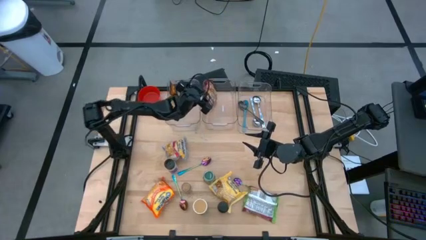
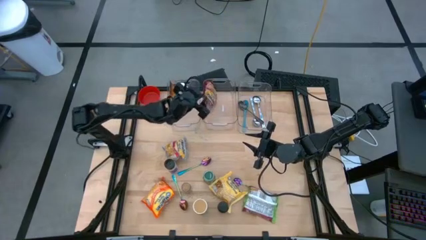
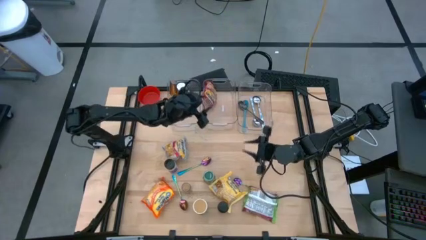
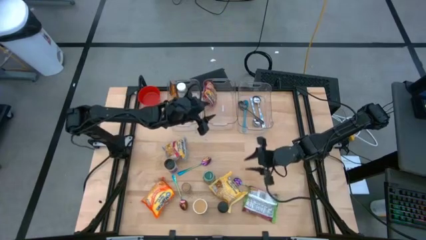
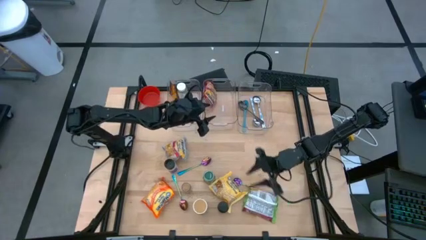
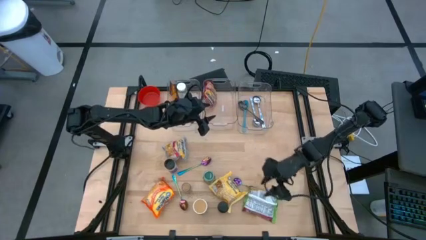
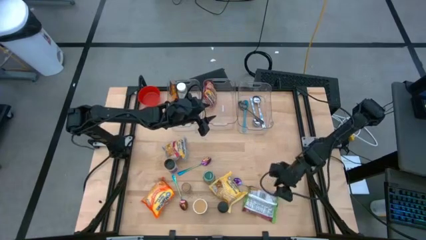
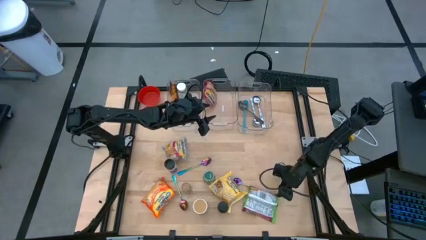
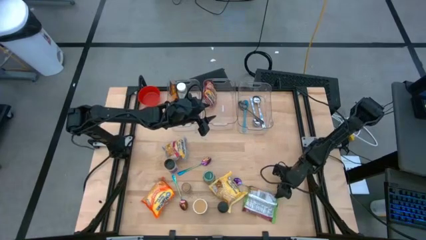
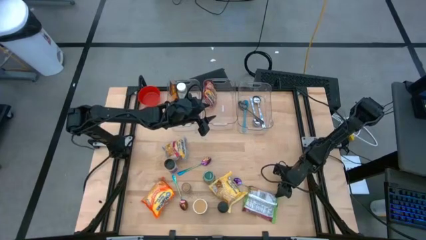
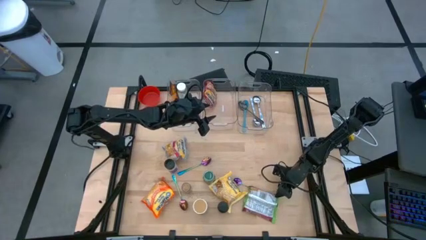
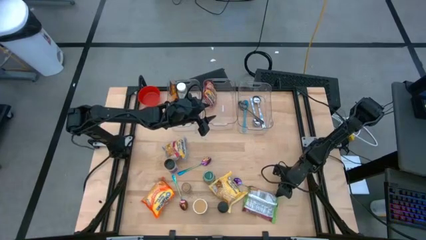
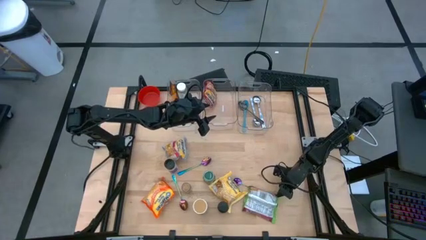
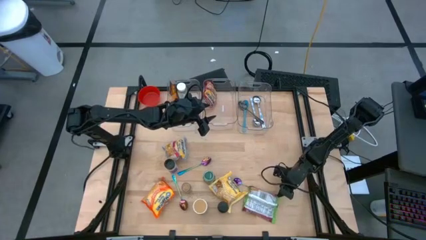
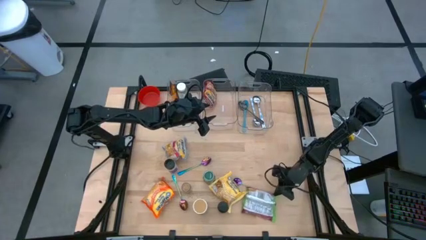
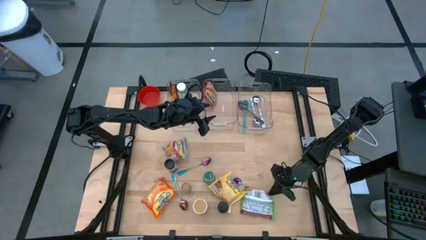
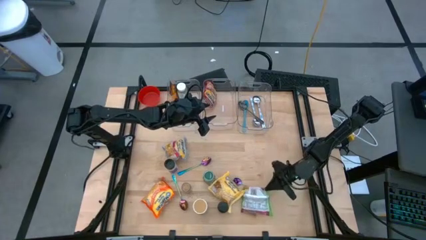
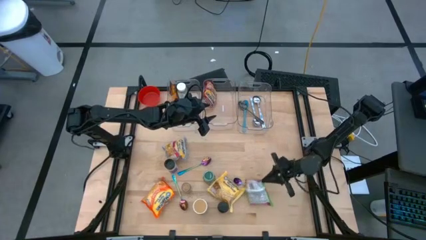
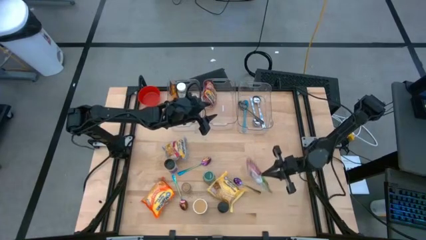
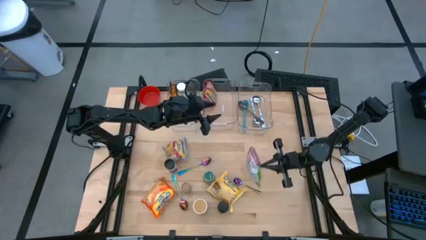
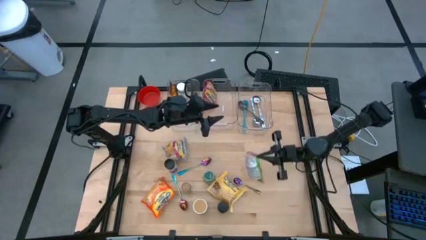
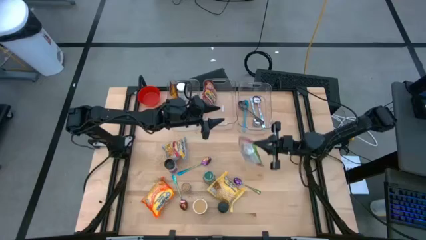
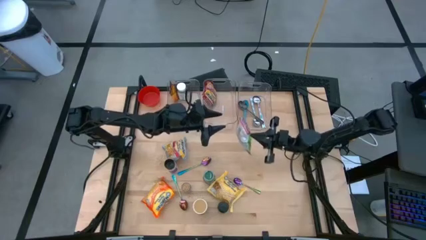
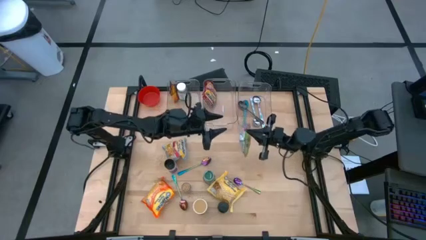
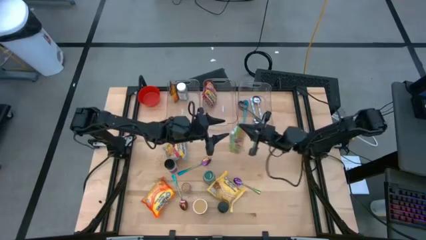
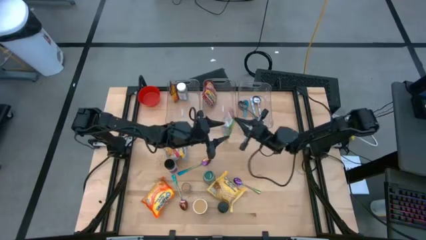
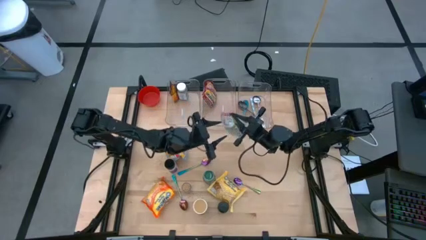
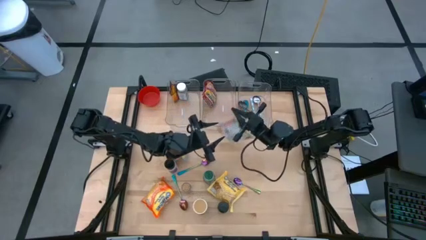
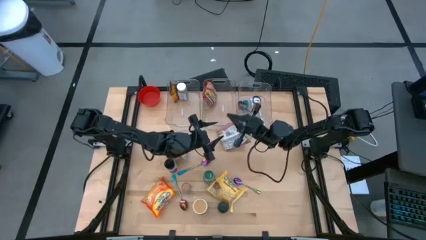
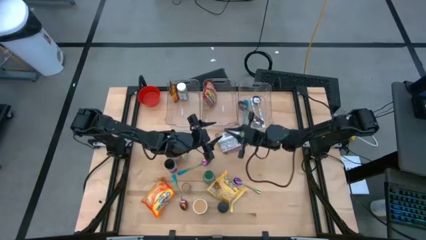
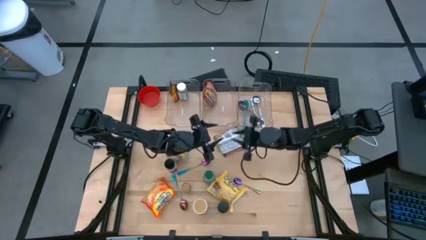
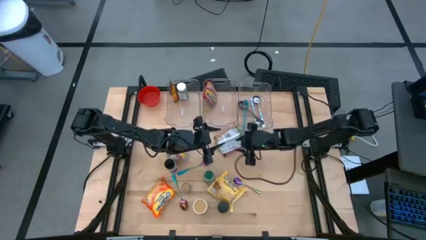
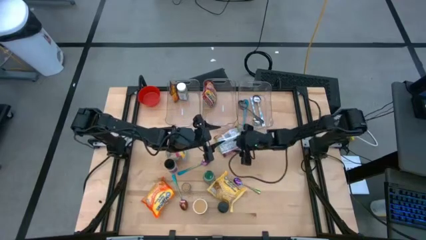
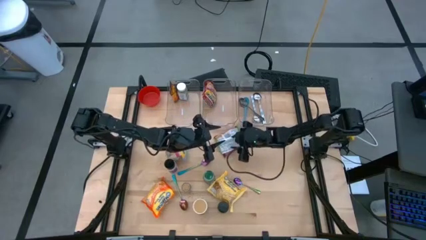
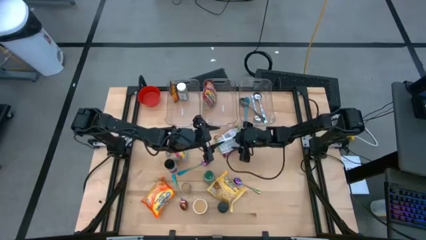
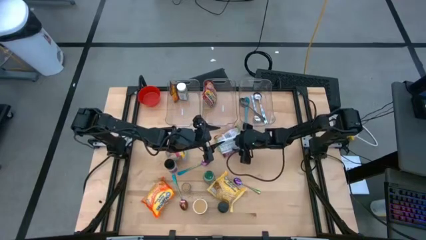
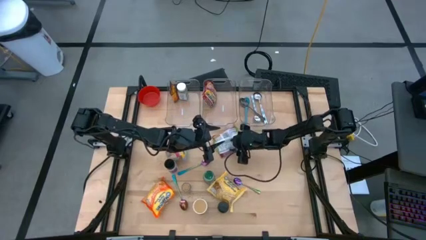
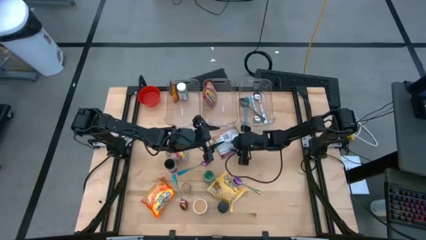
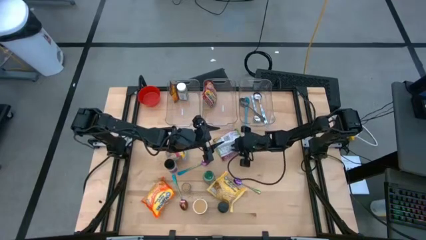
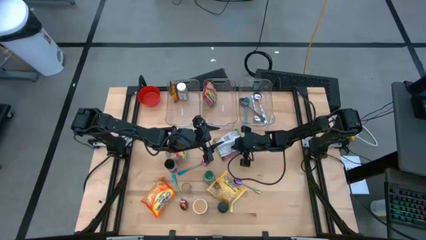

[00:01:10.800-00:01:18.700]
Task: Pick & Place Food Item
Put the green noodle pack into the middle transparent bin

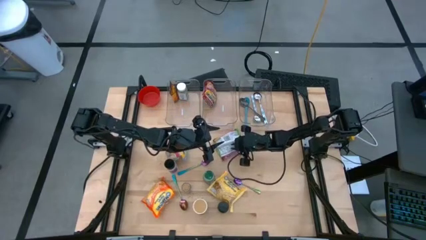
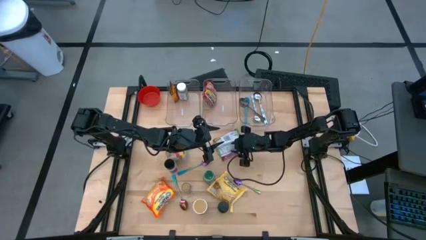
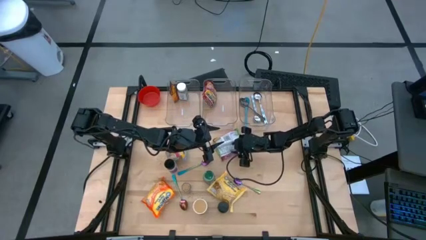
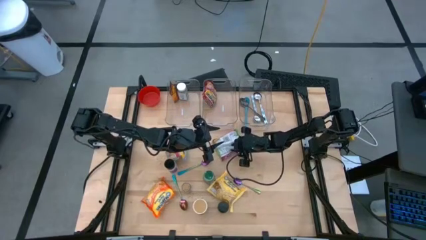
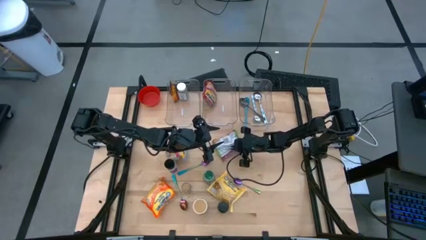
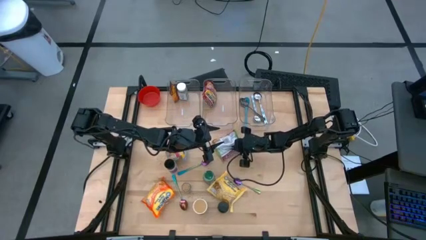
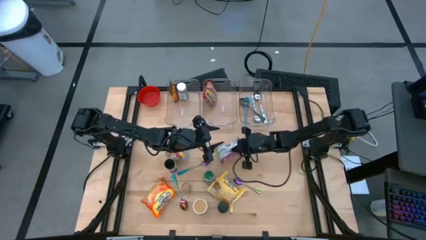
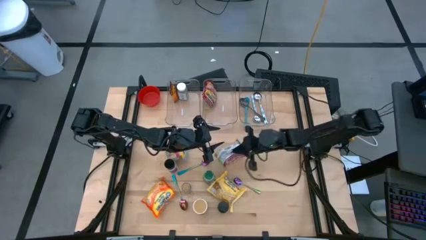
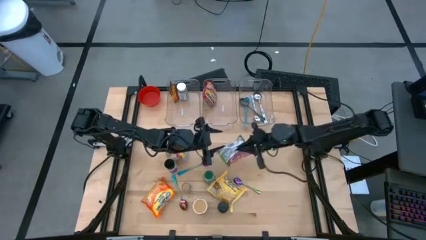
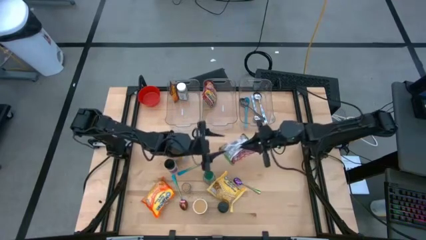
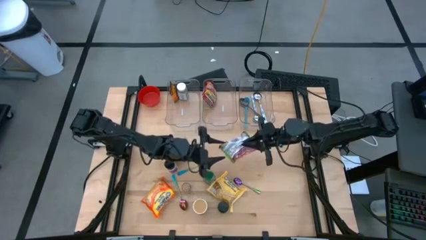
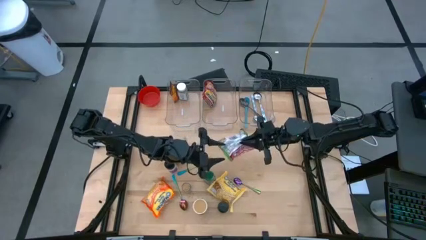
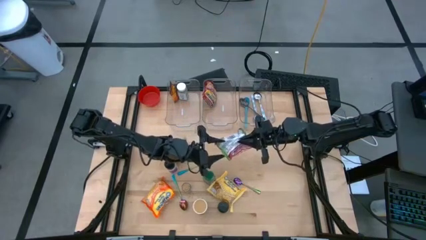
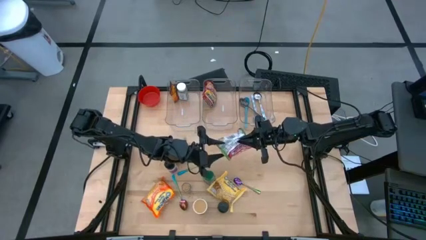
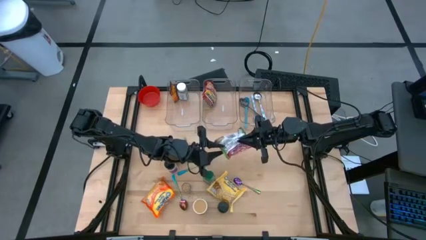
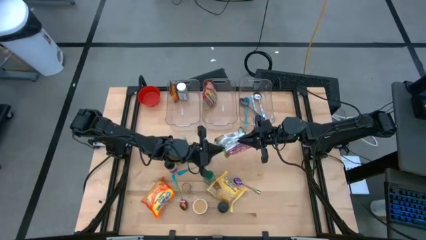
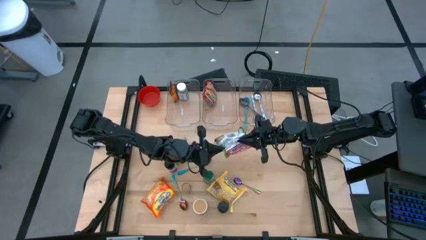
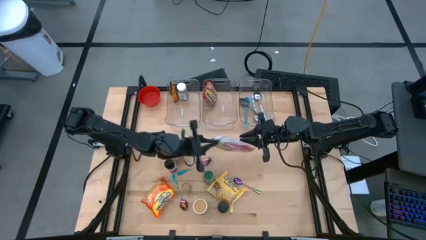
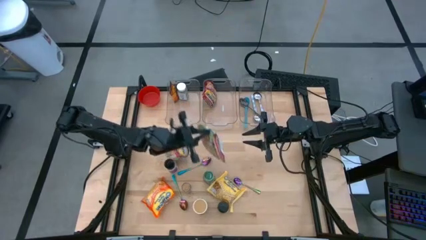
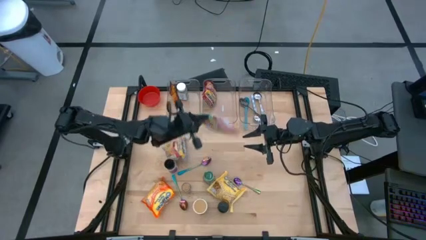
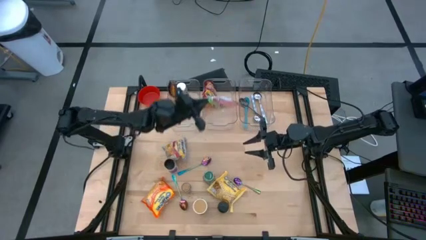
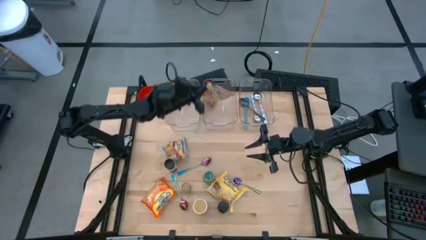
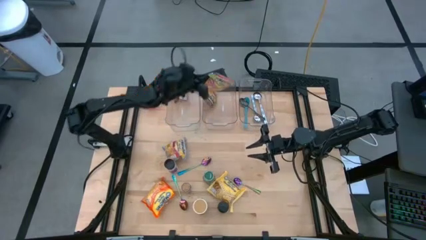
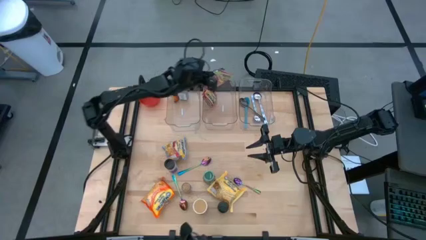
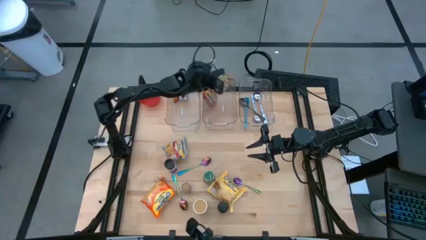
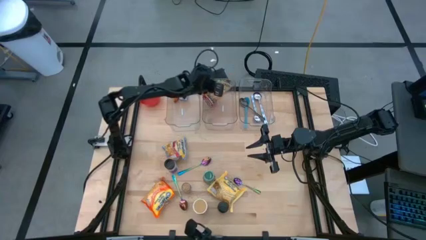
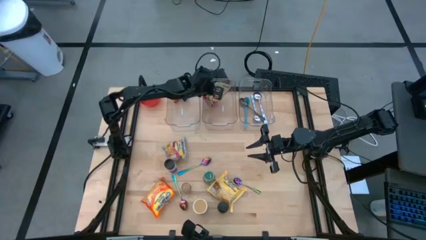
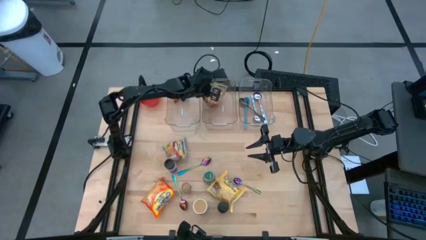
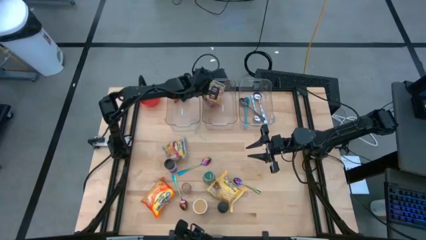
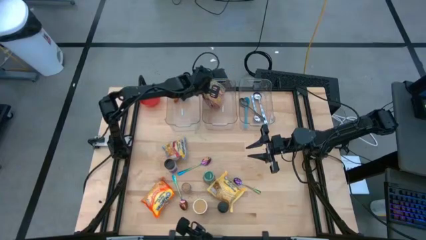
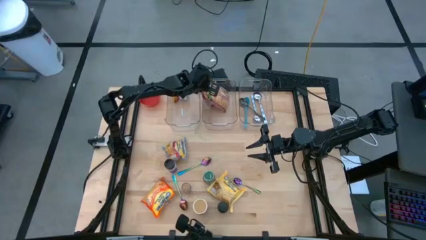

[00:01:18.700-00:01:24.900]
Put the green noodle pack into the middle transparent bin

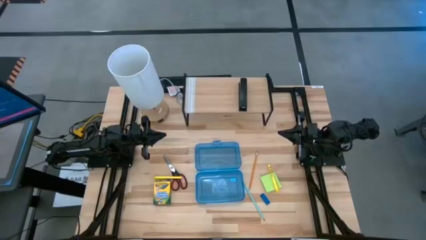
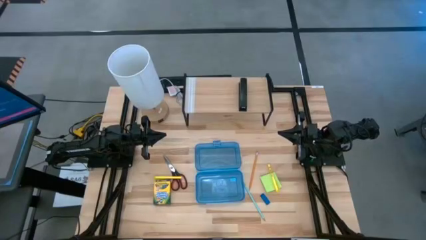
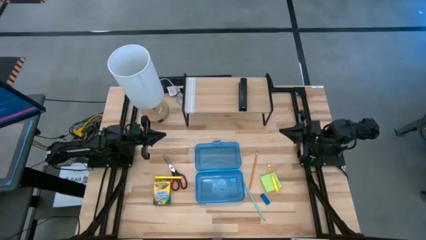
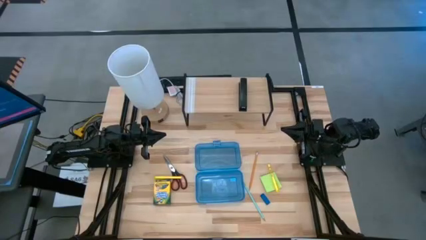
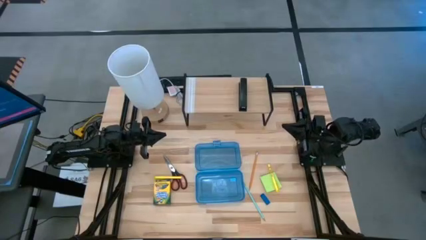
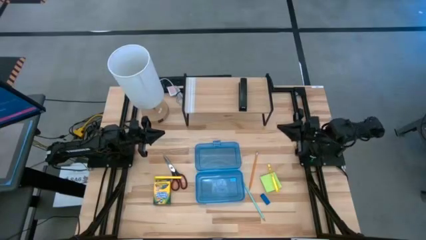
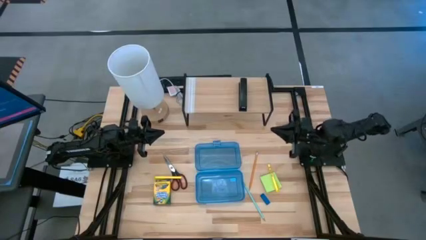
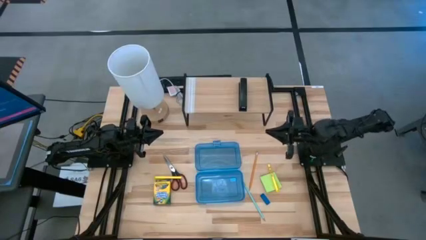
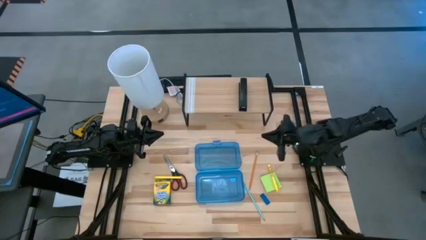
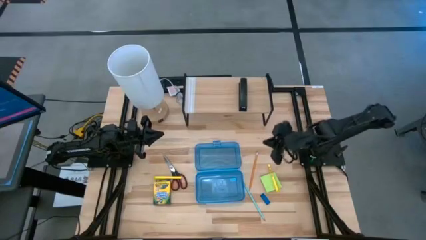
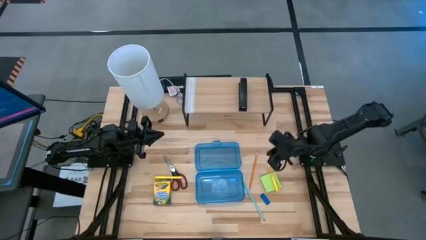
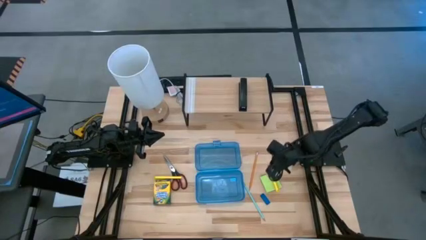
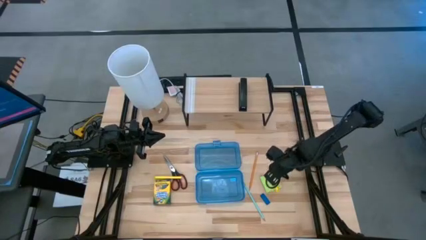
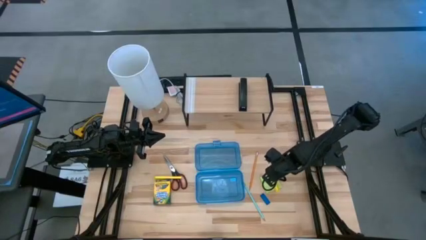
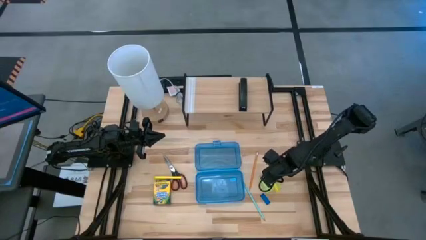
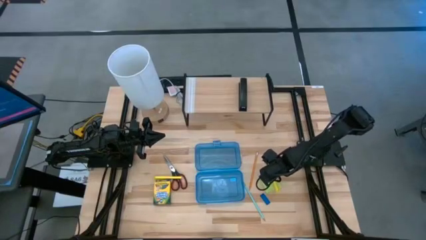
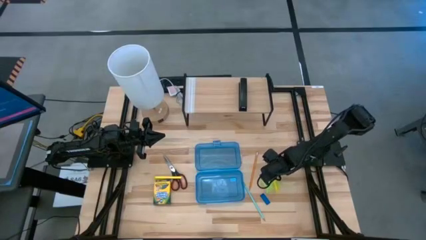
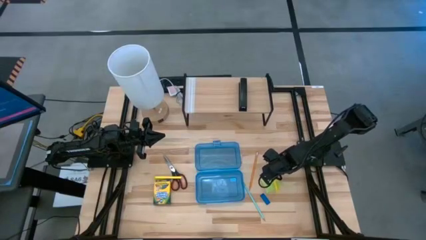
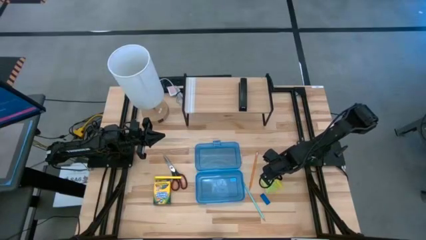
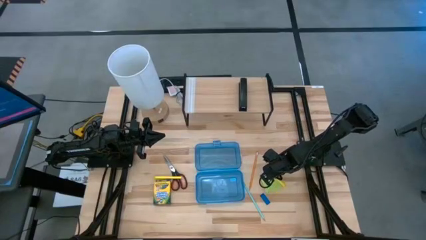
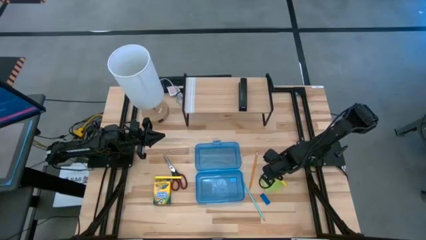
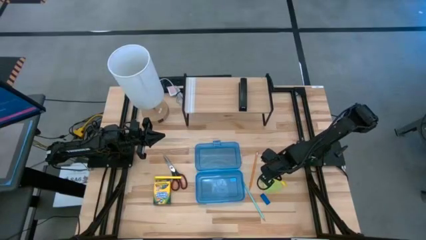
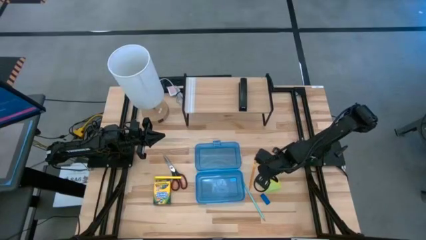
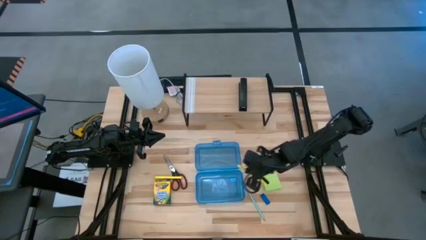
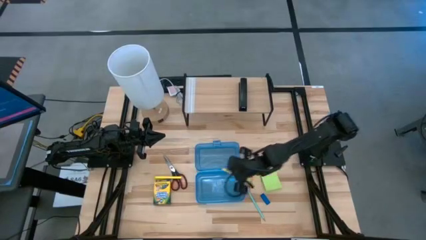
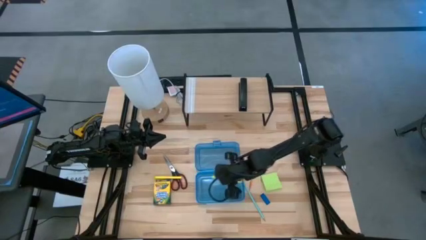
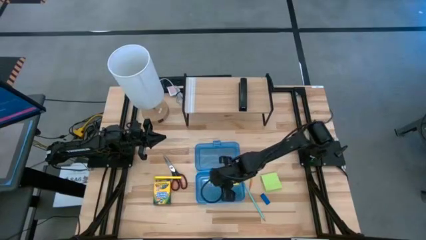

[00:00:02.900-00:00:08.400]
Task: Pack school essentials
Put the yellow pen into the blue supply box
